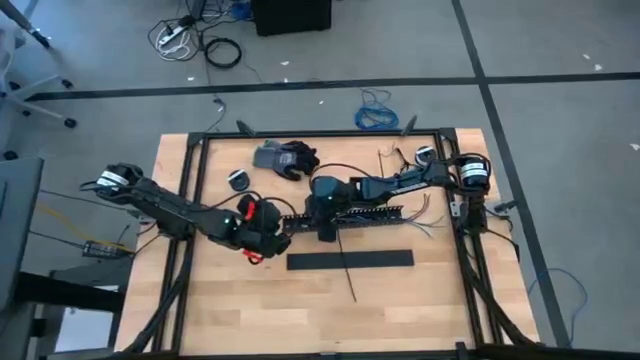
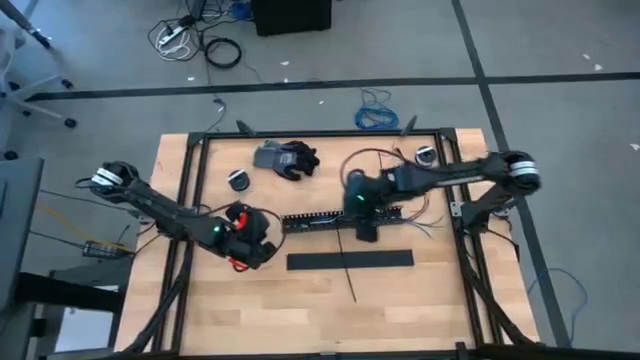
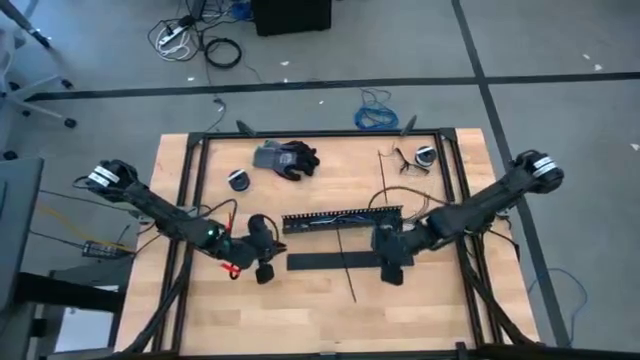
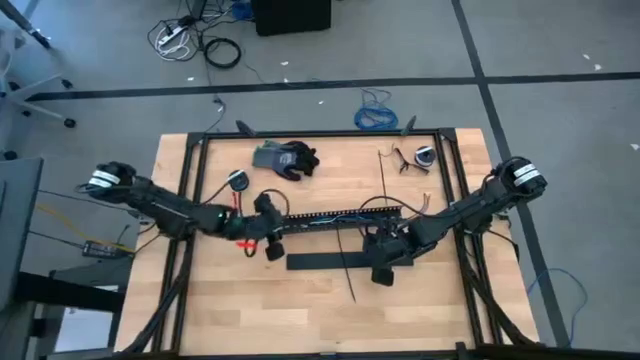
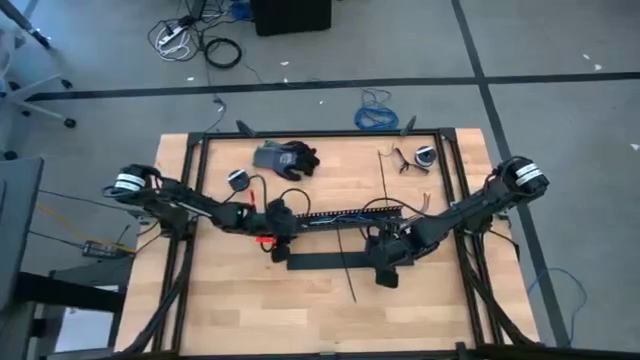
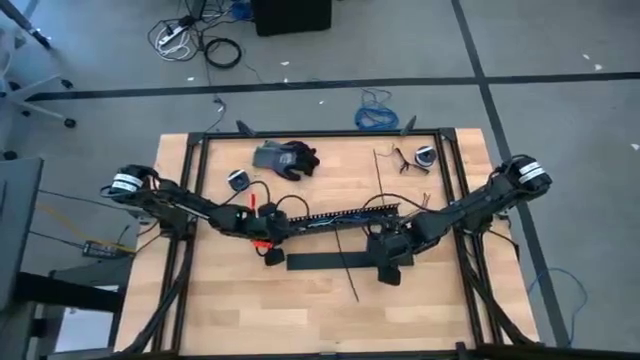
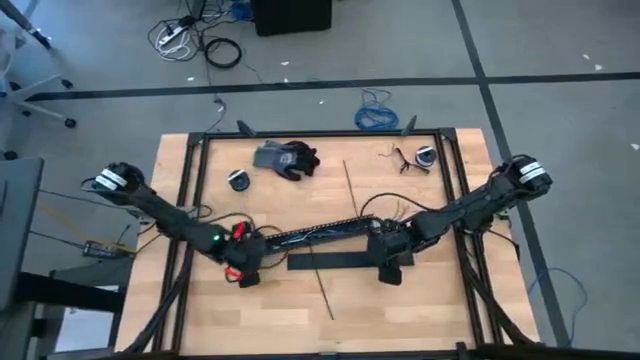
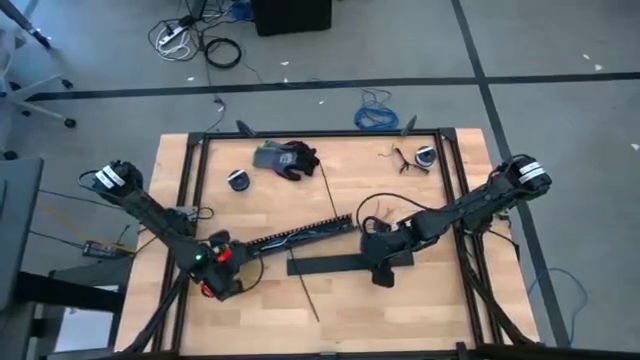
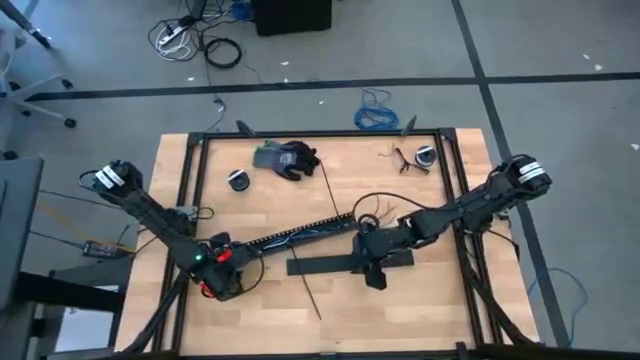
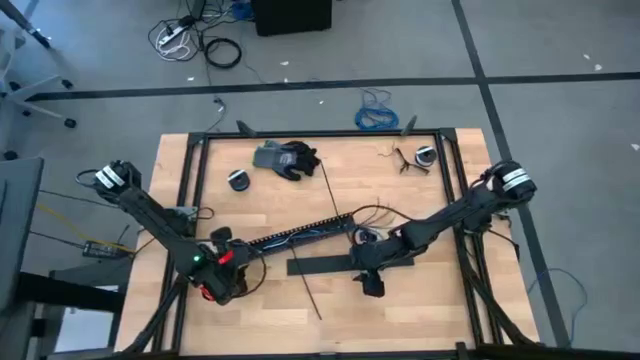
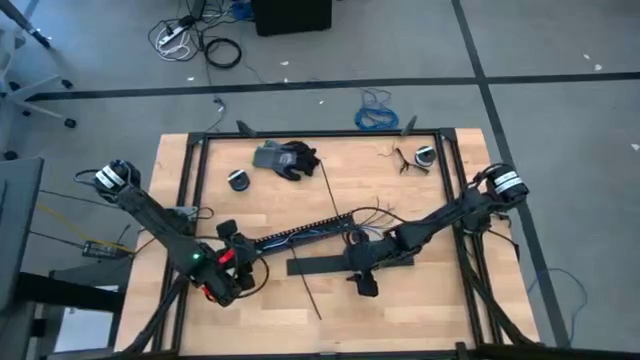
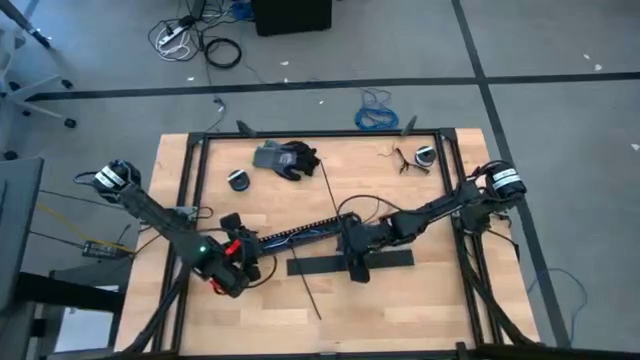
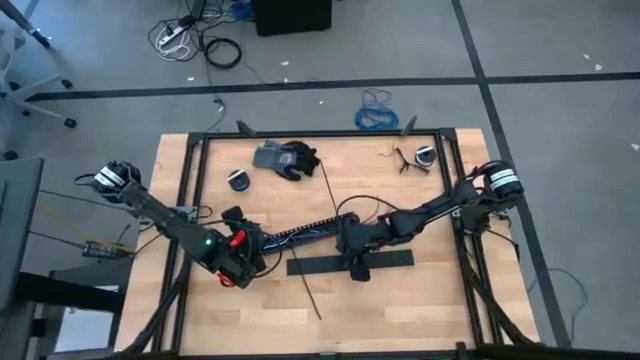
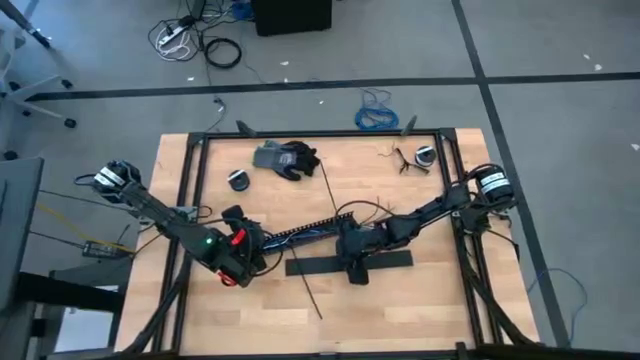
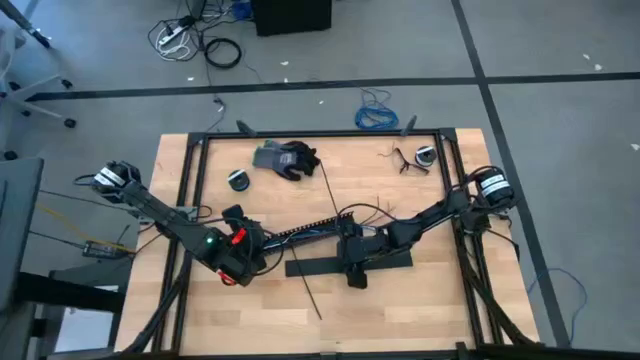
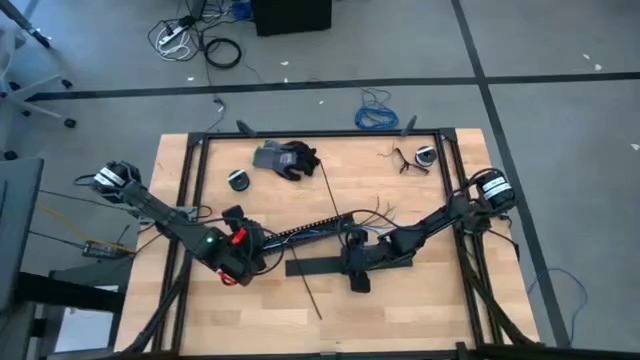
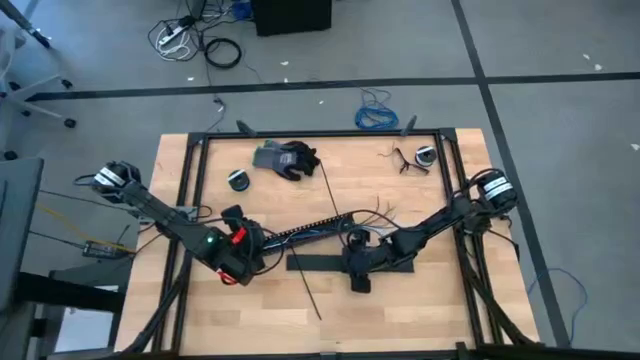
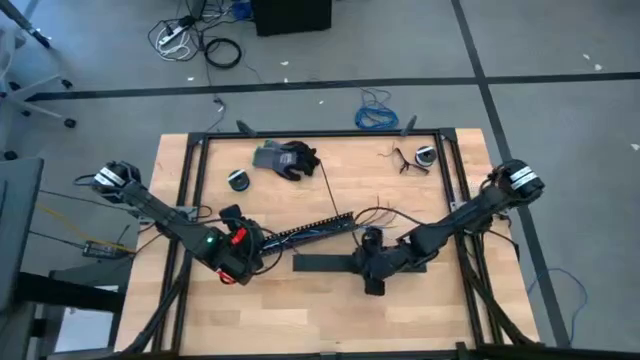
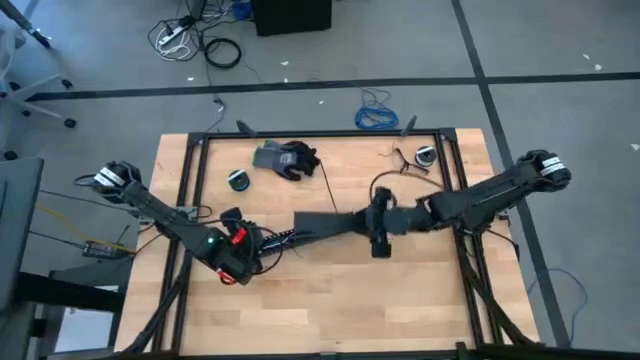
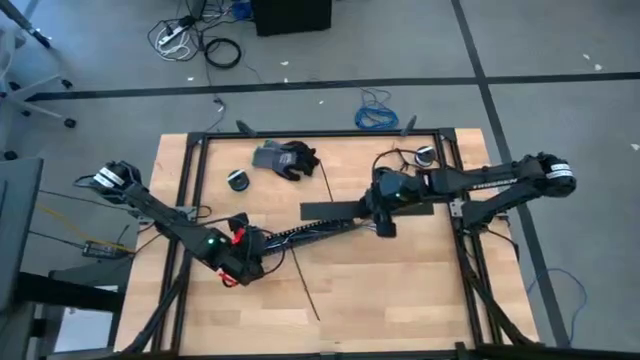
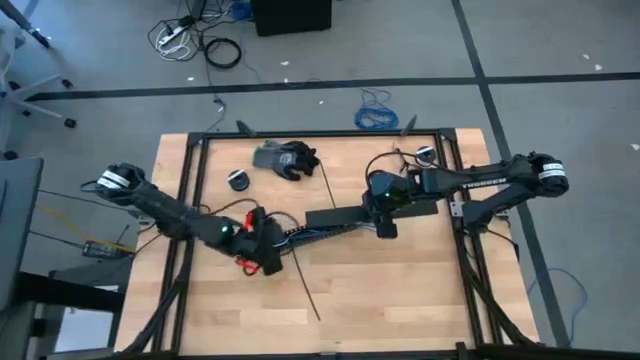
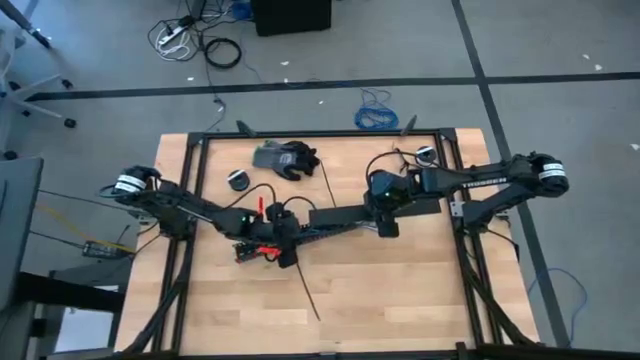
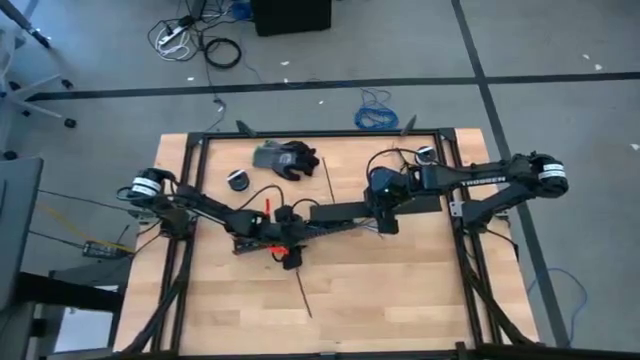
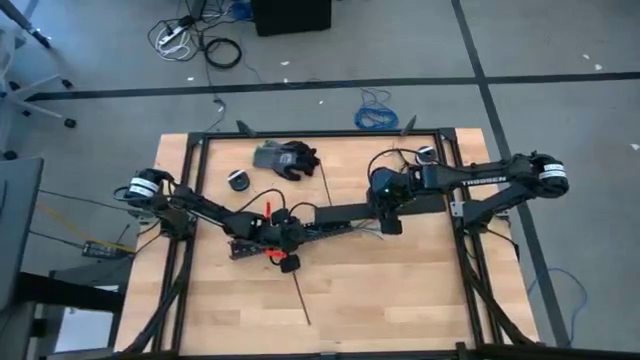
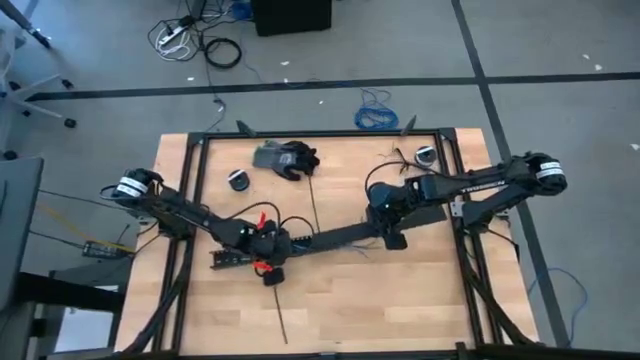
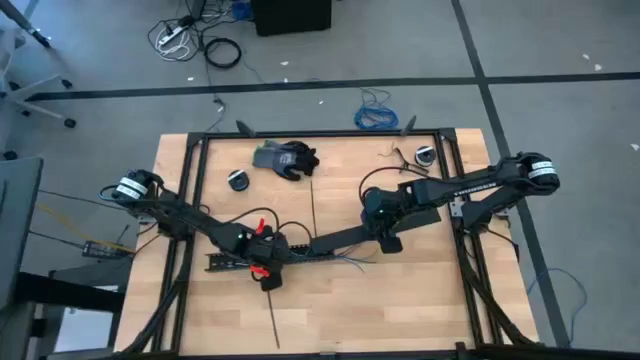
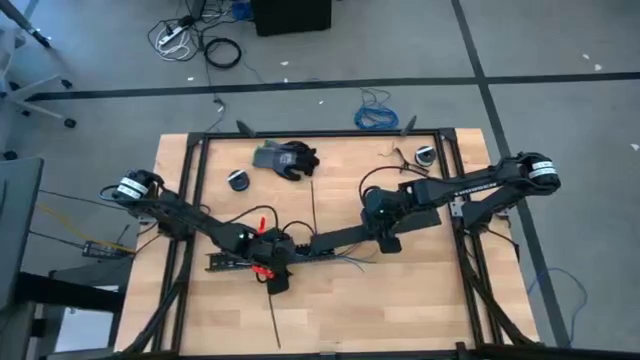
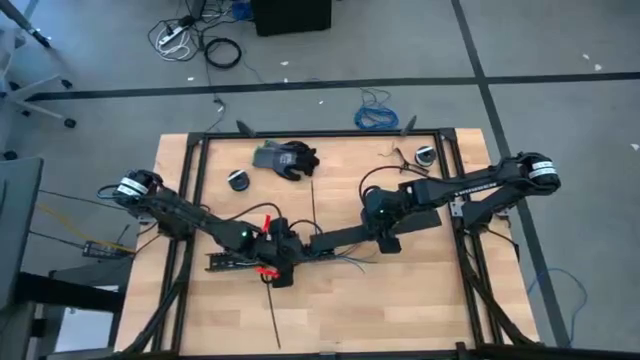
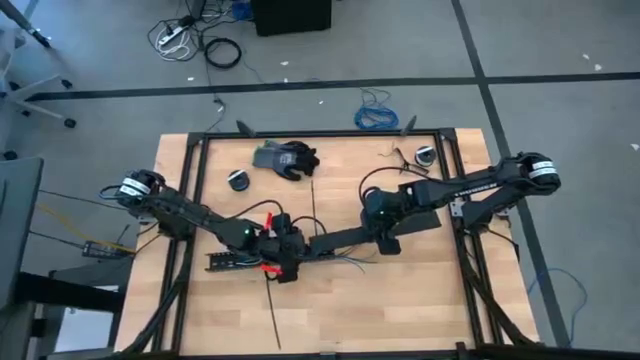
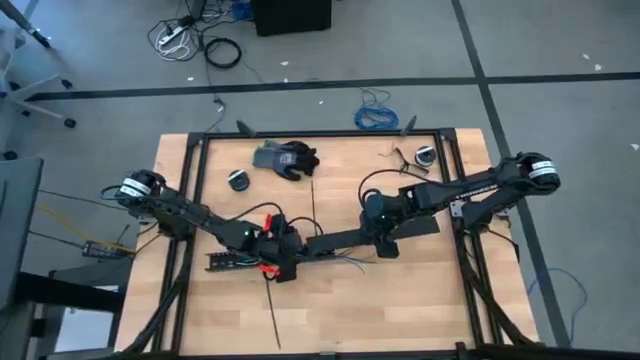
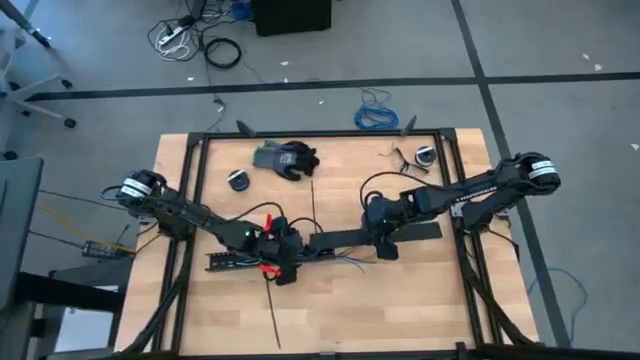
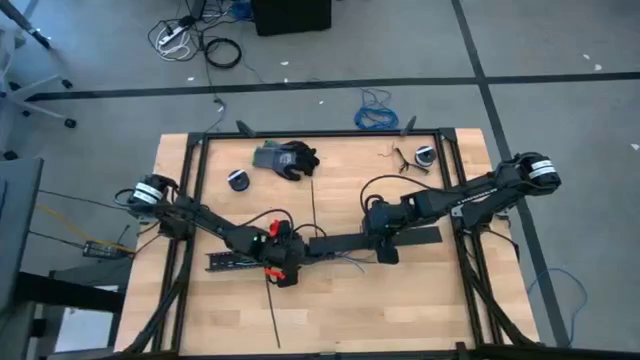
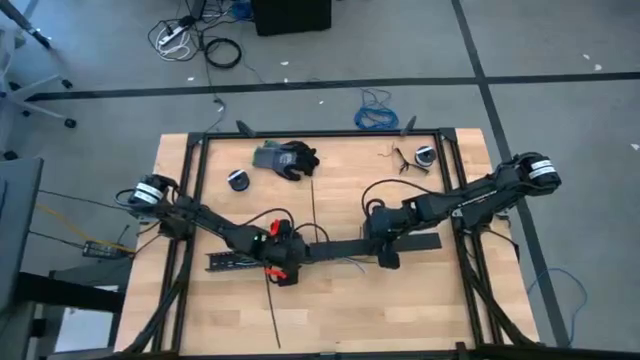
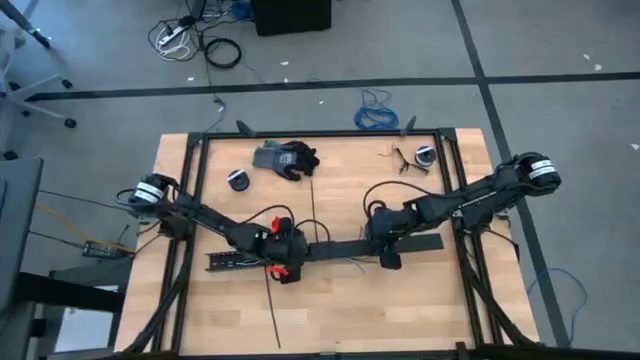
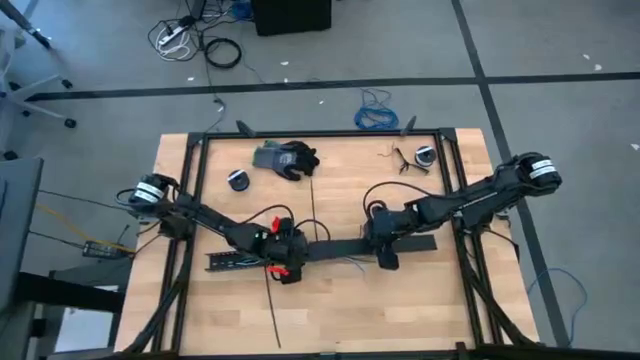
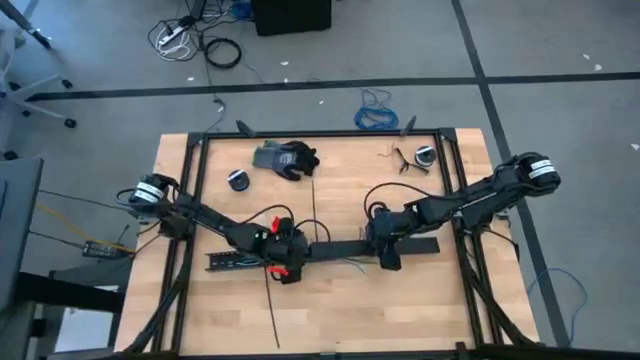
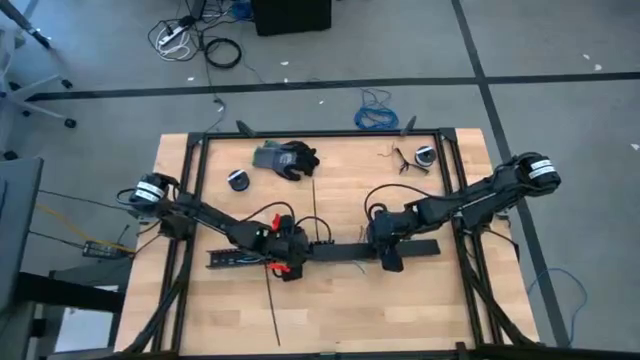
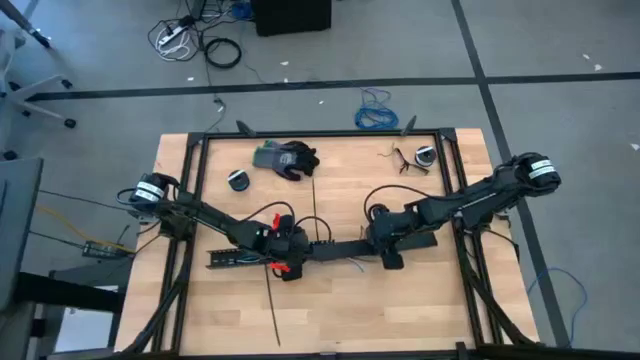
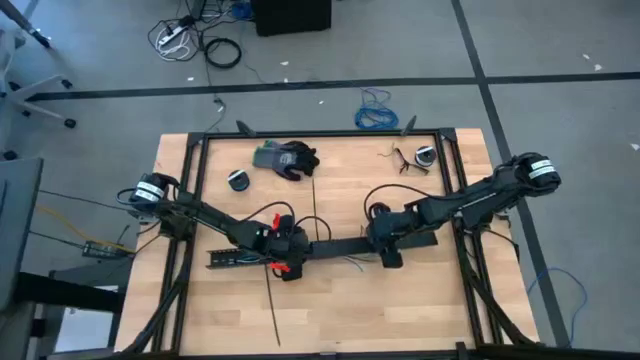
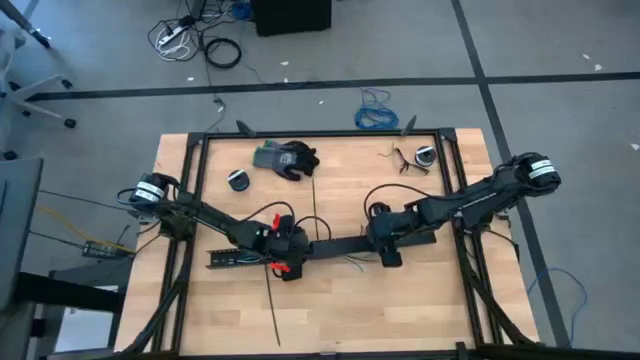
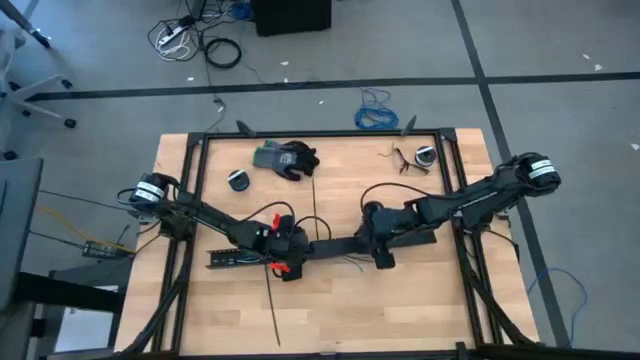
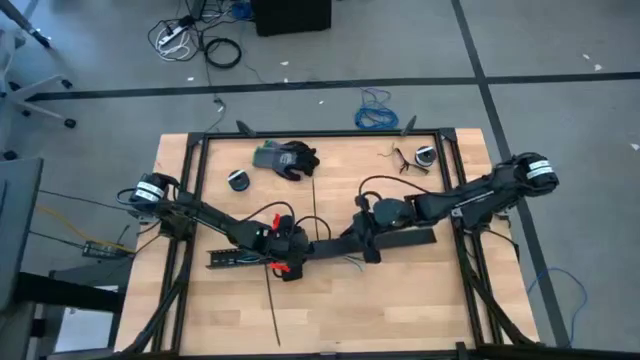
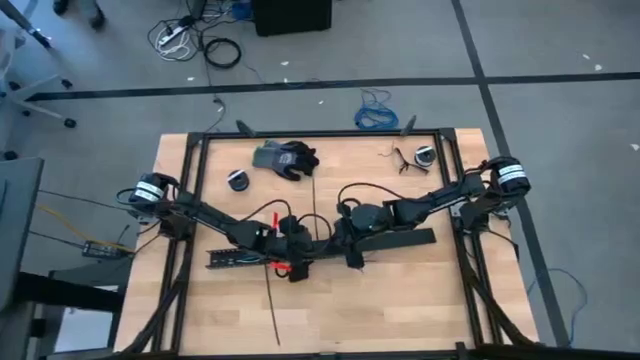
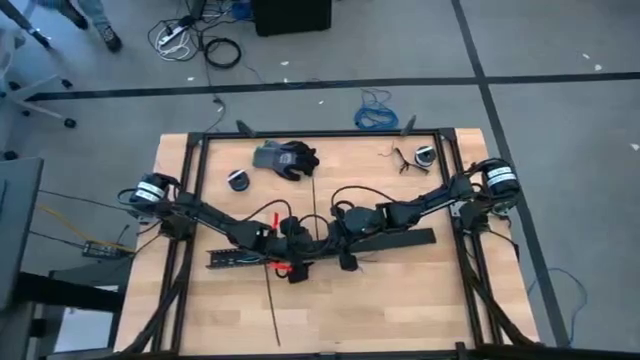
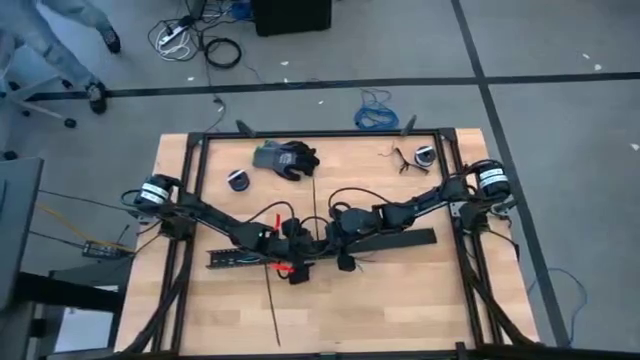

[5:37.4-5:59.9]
Task: Ziptie cables
Close the black cable duct
